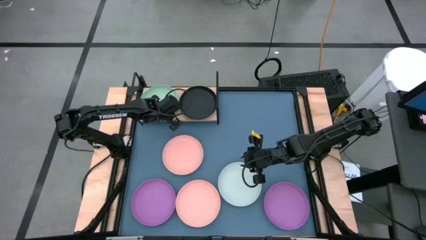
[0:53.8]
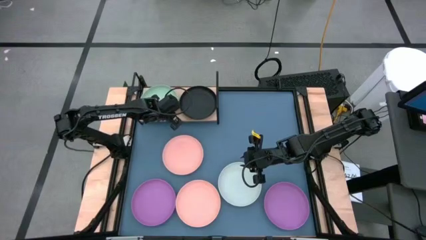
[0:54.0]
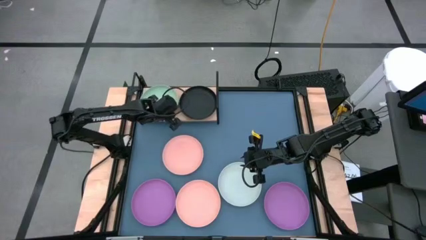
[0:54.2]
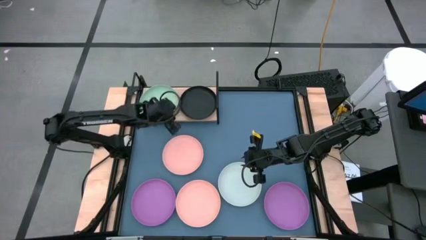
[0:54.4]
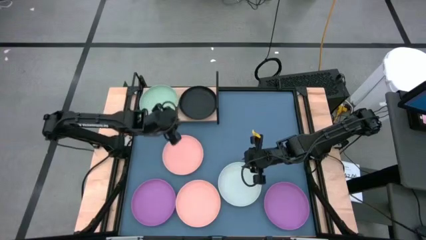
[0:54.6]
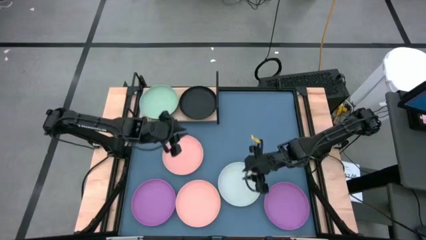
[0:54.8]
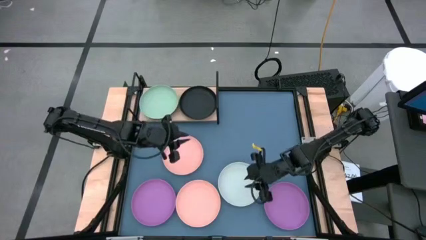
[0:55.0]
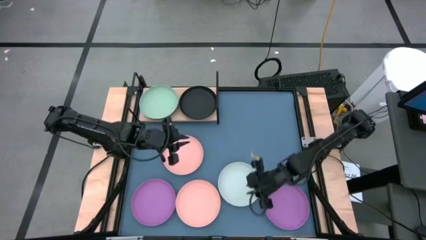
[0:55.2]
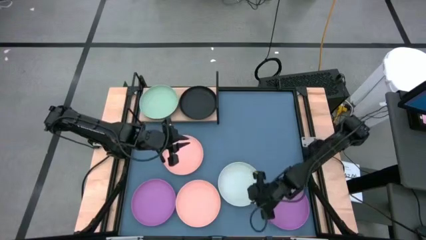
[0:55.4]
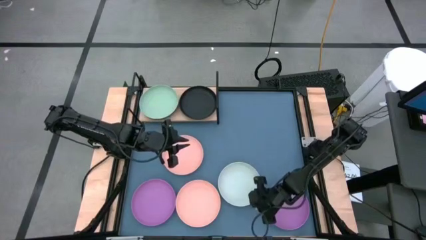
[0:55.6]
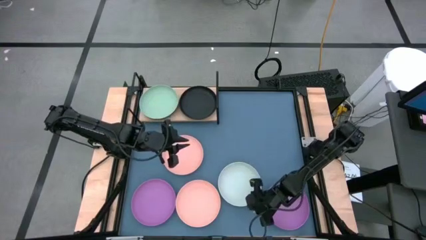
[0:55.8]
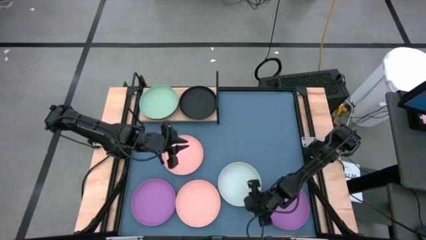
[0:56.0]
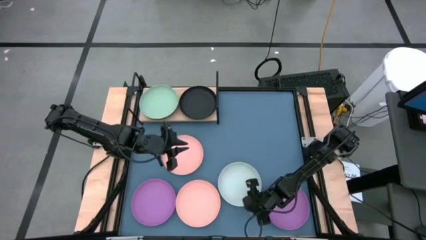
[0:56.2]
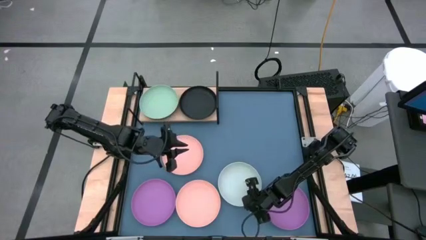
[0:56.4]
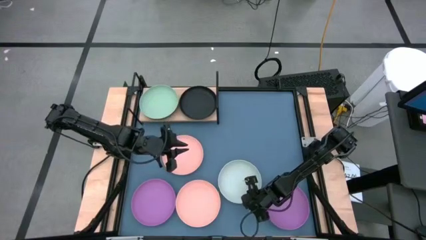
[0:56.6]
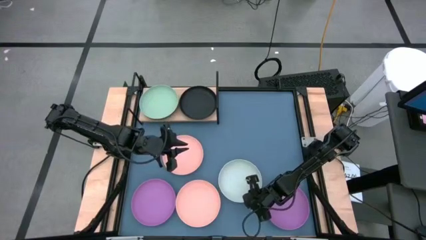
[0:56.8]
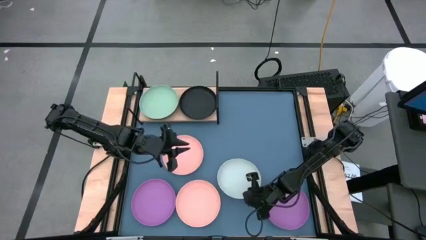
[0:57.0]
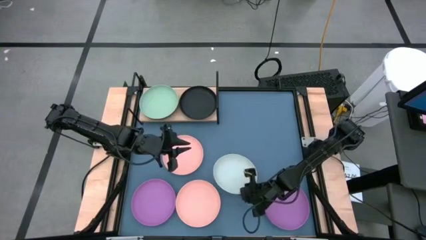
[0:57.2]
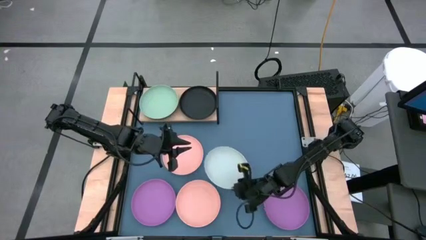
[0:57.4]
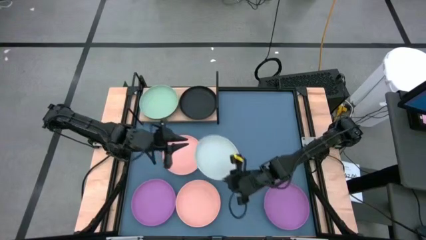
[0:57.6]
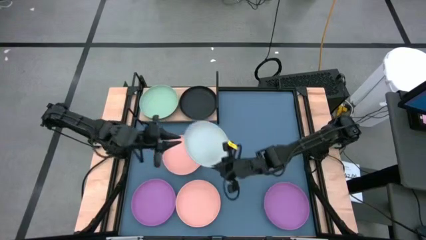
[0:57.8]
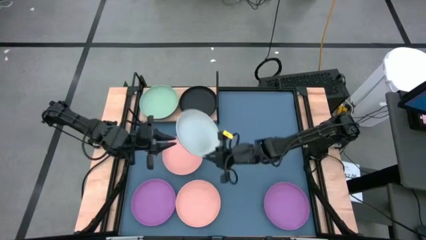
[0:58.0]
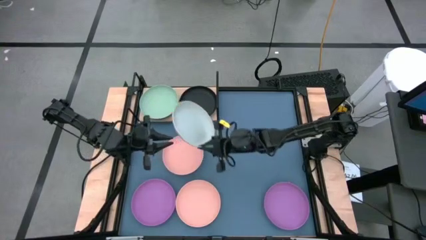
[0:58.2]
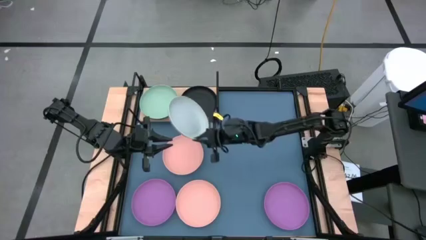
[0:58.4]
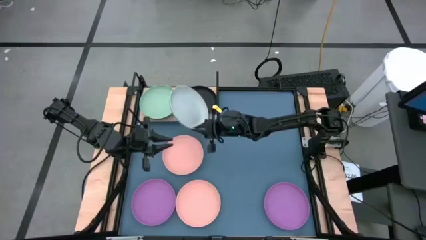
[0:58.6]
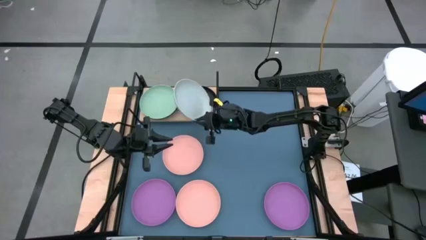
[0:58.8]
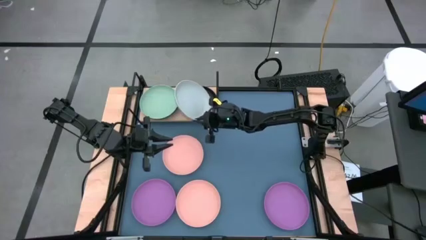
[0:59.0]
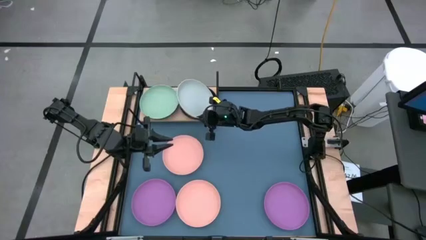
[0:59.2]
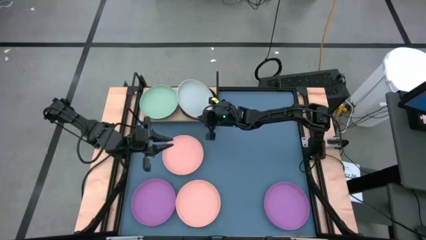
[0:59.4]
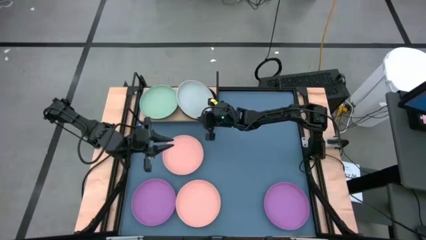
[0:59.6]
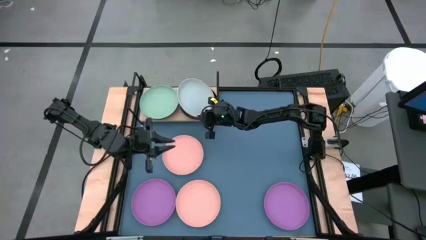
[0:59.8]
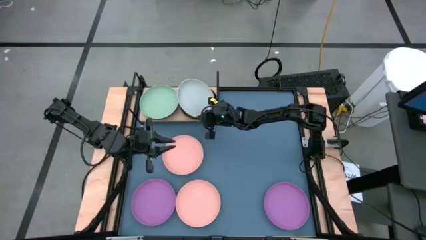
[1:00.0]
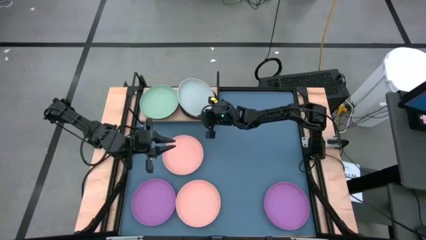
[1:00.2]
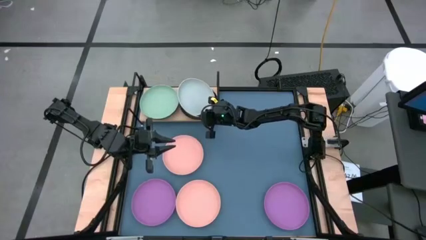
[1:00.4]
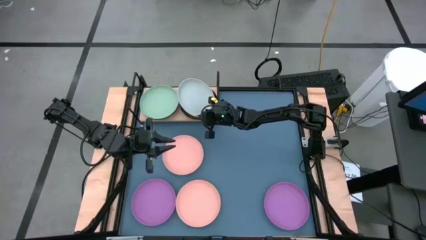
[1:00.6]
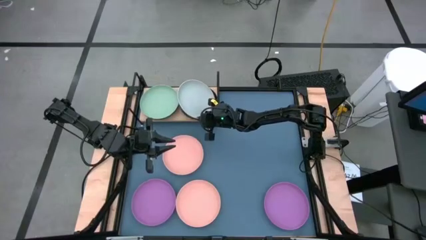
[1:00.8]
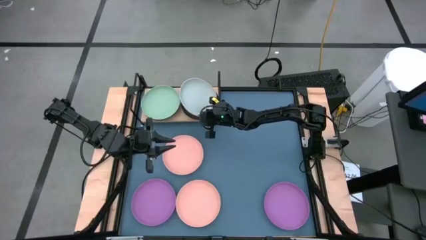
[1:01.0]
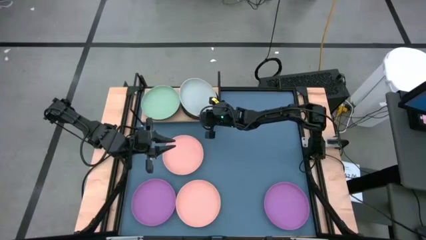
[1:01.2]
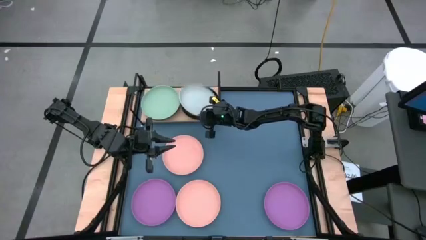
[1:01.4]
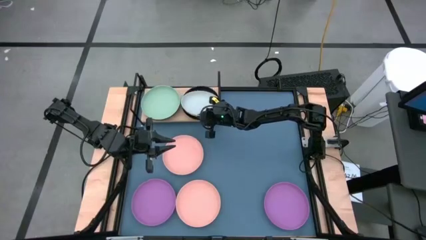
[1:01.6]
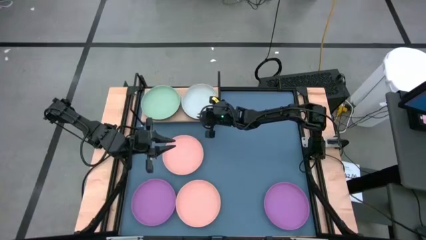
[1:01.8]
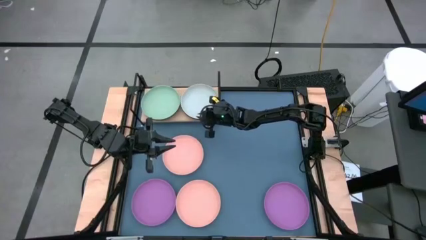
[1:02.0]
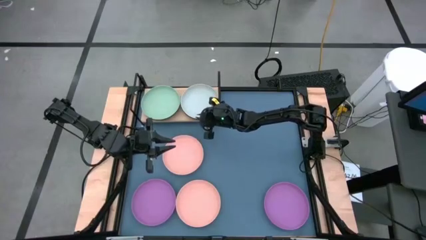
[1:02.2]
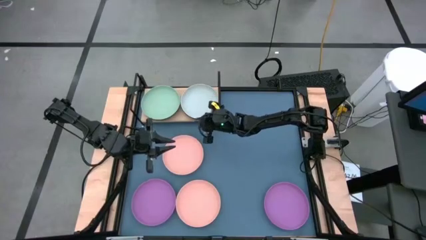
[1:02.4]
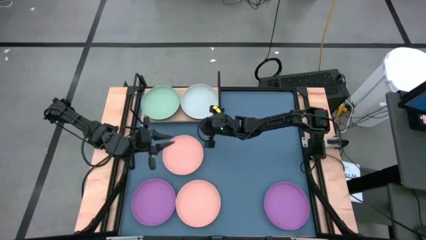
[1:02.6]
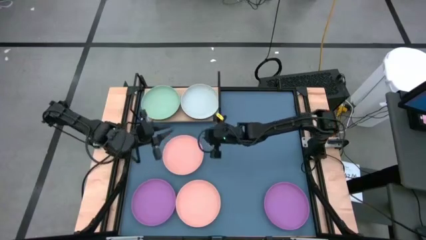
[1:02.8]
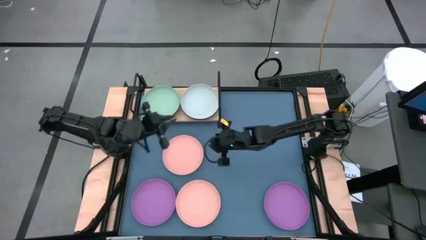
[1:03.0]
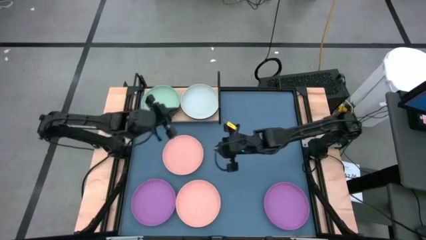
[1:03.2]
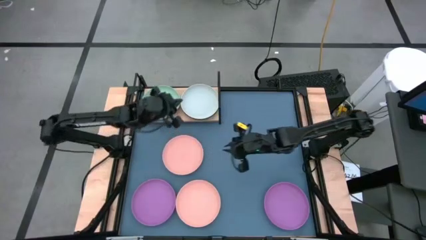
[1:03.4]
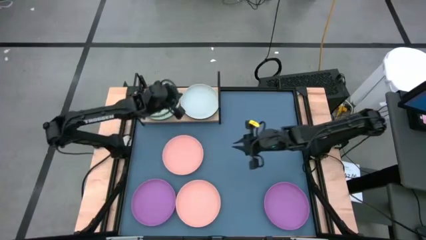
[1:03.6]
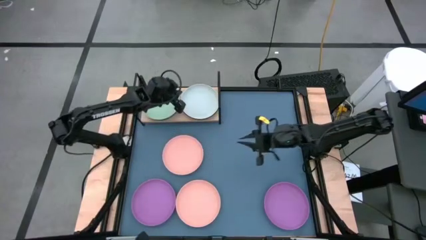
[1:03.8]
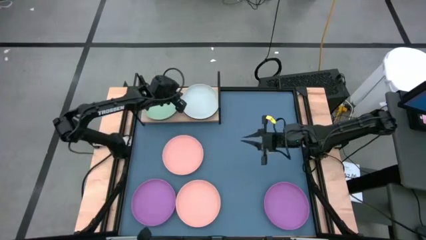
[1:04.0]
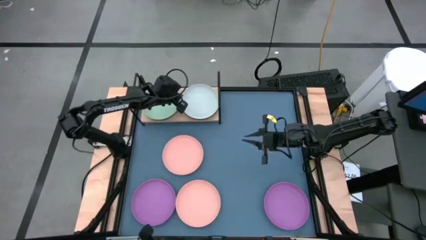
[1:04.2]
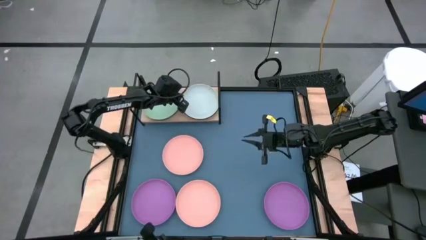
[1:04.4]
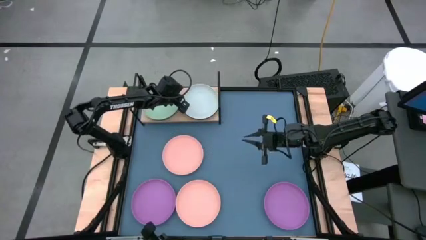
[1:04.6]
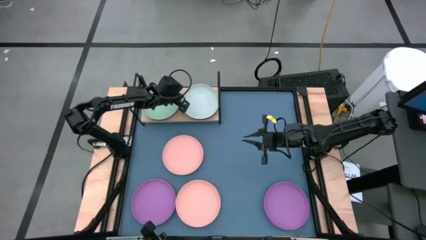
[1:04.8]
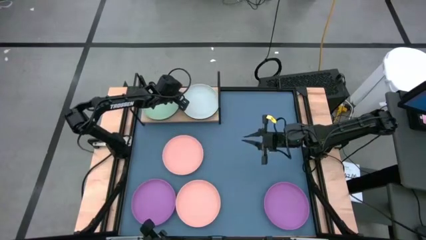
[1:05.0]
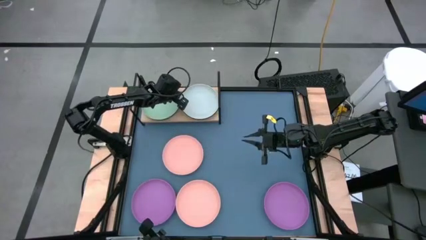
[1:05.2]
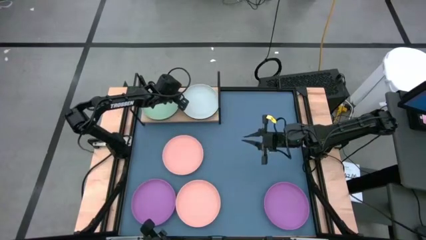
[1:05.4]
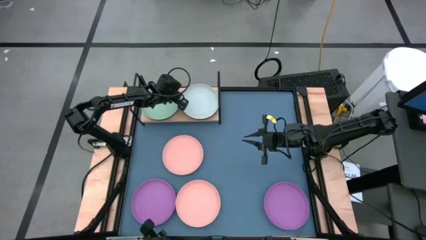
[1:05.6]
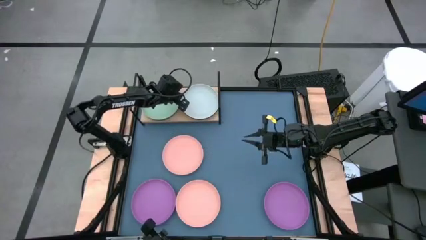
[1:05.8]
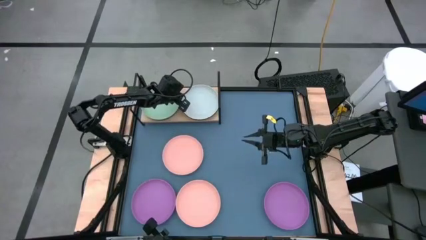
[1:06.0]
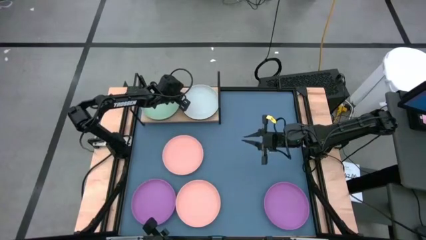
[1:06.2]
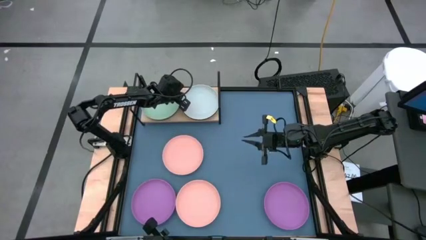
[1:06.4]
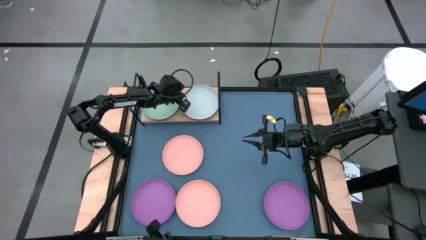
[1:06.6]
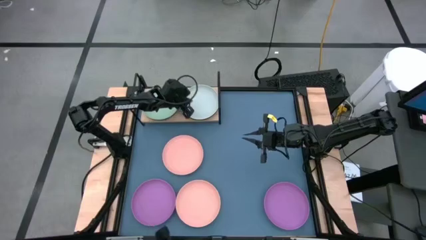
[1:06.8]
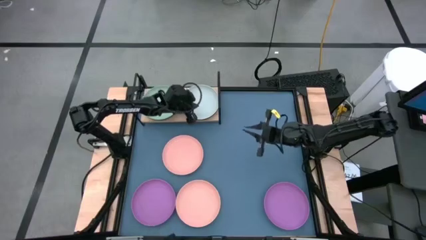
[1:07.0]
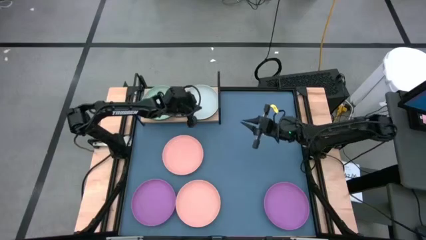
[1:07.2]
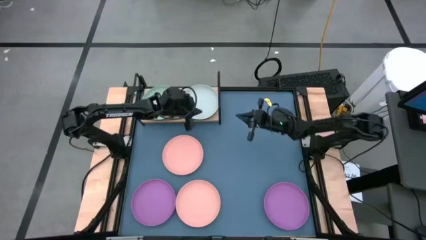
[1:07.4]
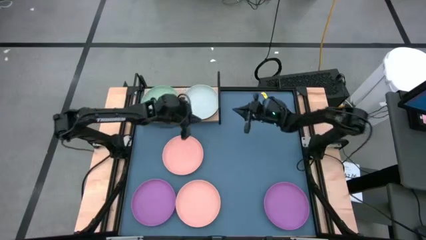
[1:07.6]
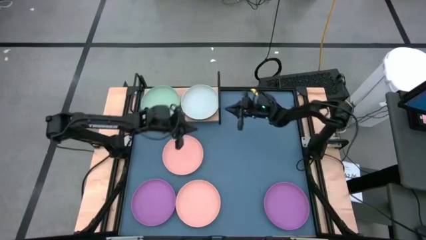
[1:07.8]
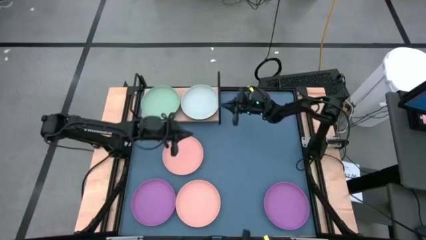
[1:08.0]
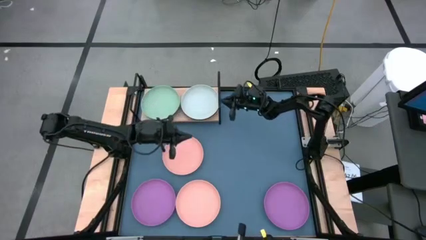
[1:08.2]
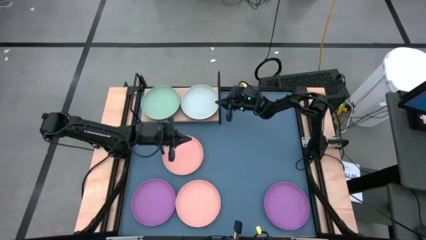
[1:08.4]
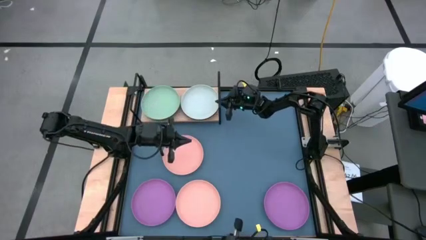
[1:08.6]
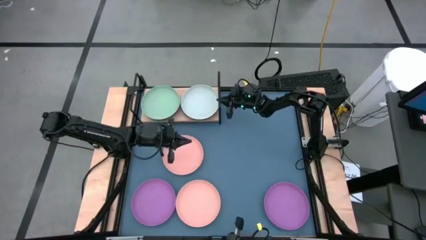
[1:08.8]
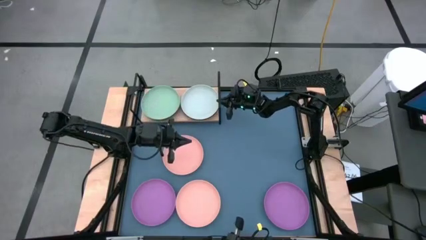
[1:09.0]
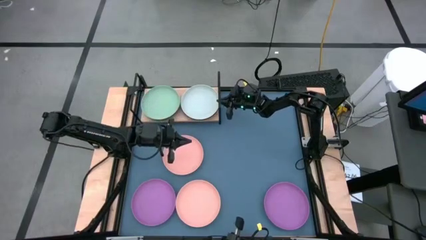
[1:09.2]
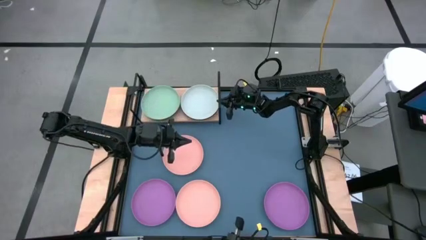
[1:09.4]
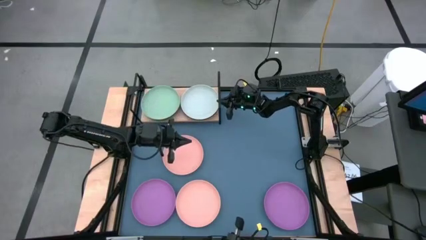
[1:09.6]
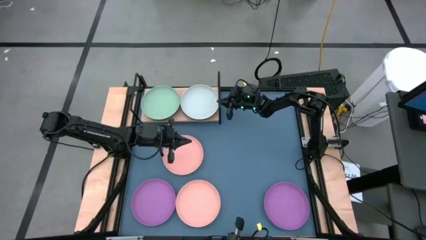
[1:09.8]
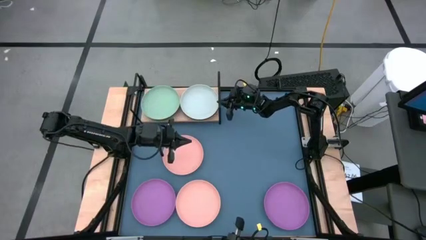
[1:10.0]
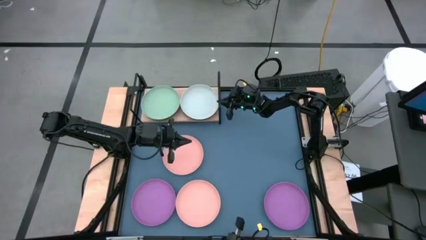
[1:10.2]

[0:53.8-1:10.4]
Task: Place and stack plates onto a shelf
Stack the white plate on top of the right black plate on the shelf
